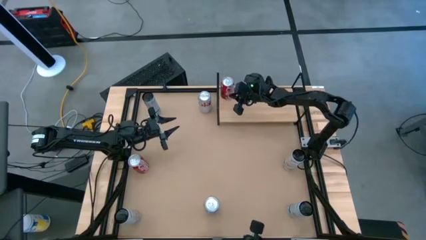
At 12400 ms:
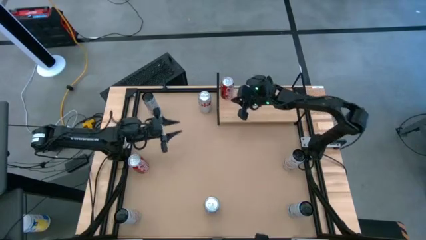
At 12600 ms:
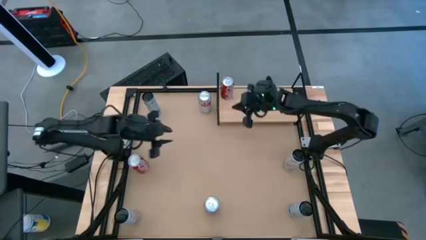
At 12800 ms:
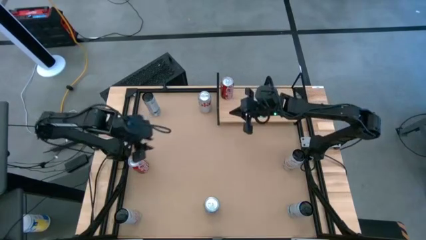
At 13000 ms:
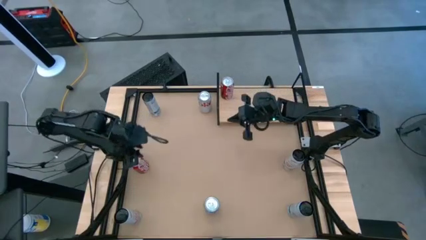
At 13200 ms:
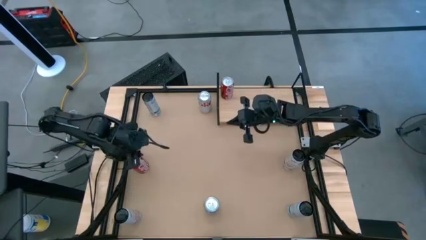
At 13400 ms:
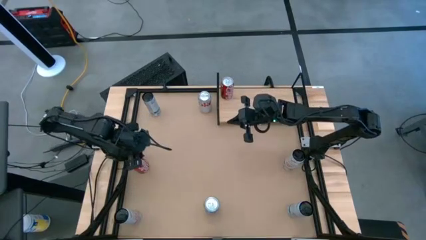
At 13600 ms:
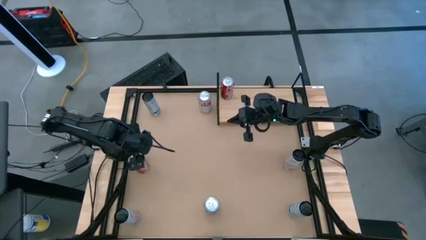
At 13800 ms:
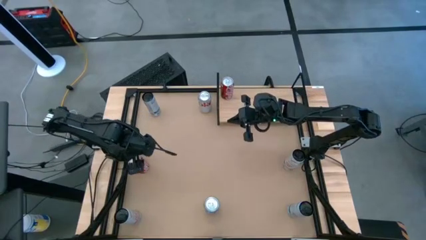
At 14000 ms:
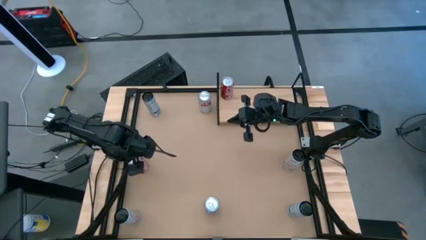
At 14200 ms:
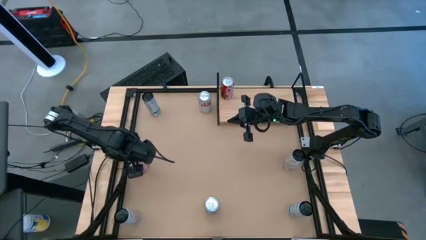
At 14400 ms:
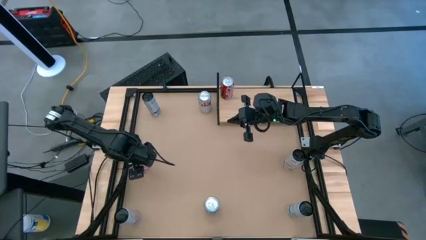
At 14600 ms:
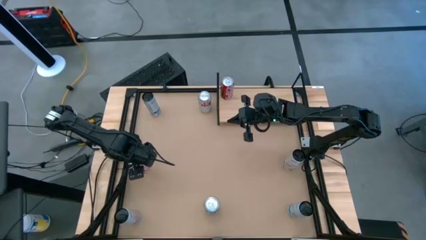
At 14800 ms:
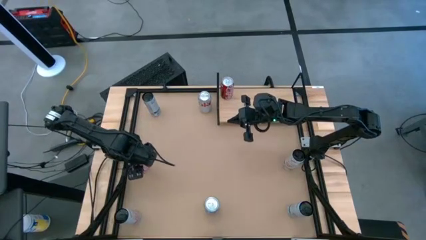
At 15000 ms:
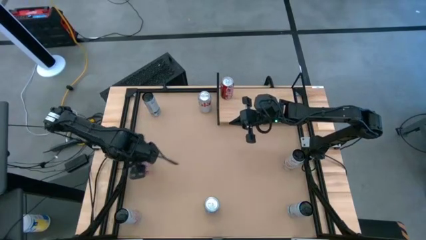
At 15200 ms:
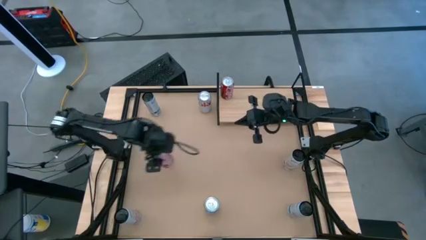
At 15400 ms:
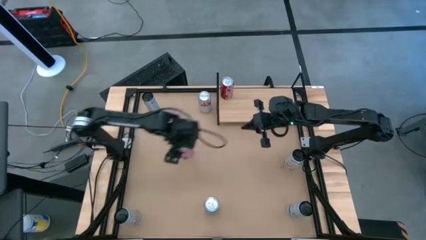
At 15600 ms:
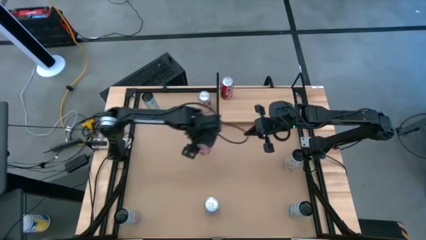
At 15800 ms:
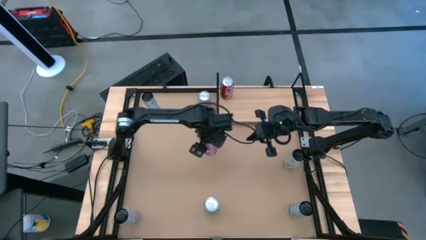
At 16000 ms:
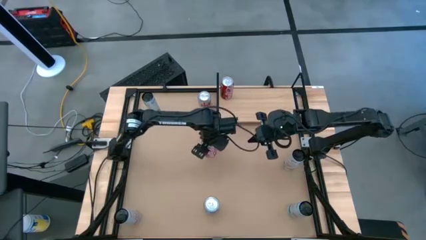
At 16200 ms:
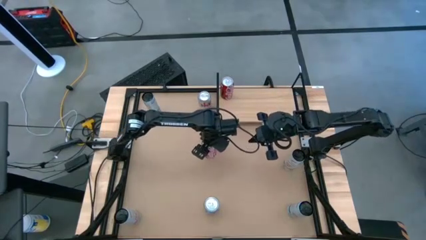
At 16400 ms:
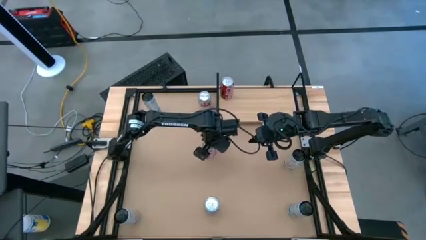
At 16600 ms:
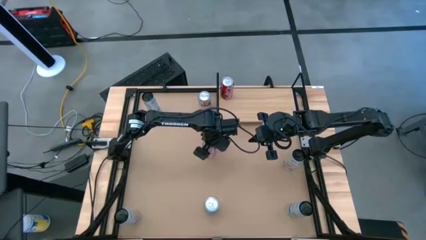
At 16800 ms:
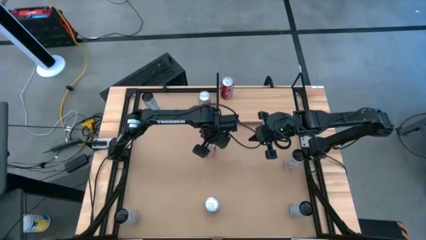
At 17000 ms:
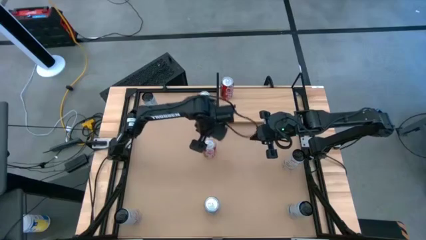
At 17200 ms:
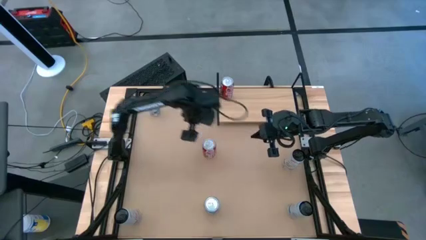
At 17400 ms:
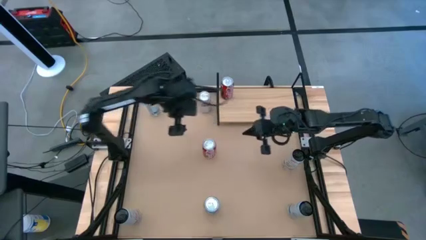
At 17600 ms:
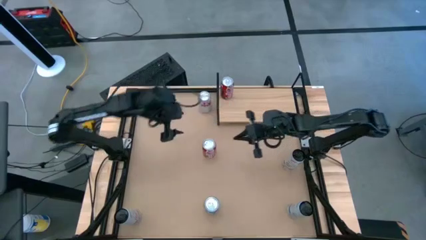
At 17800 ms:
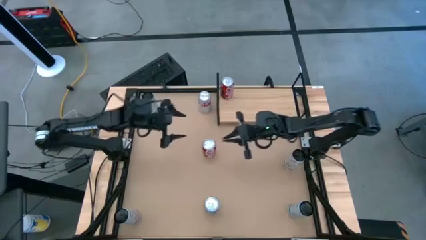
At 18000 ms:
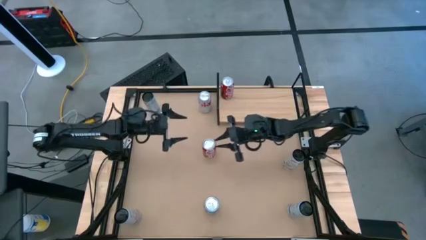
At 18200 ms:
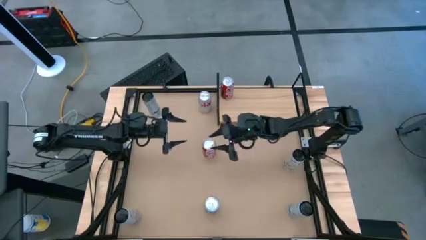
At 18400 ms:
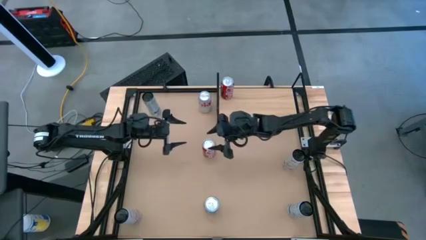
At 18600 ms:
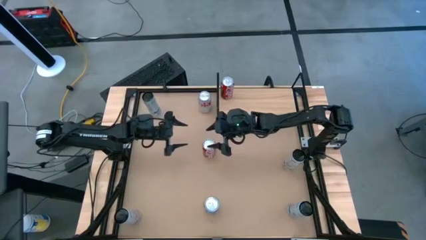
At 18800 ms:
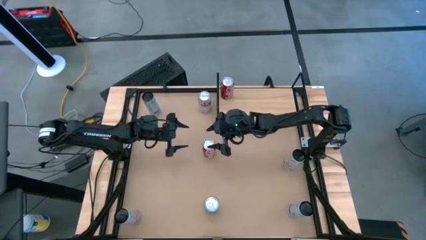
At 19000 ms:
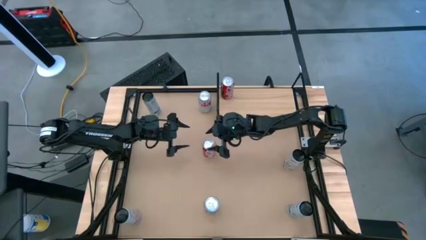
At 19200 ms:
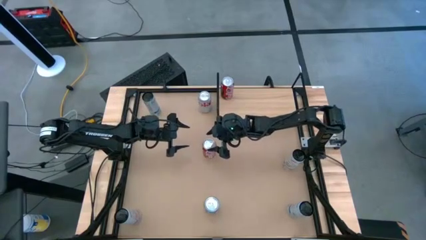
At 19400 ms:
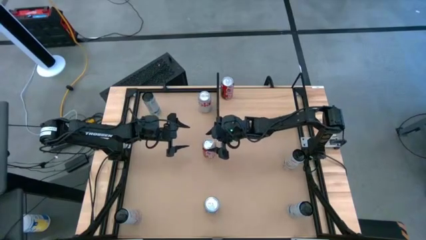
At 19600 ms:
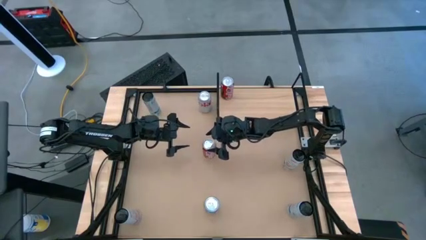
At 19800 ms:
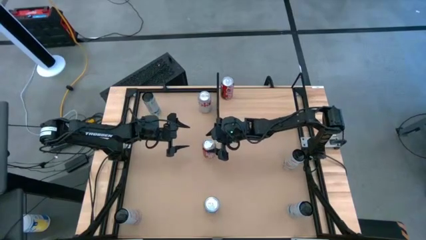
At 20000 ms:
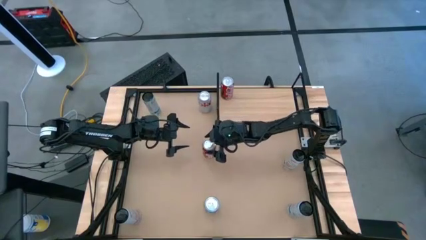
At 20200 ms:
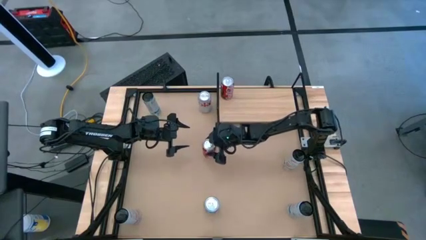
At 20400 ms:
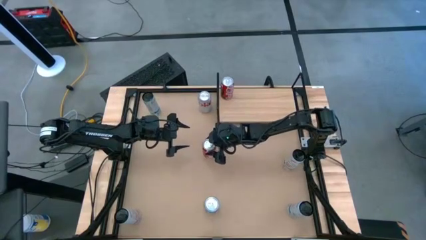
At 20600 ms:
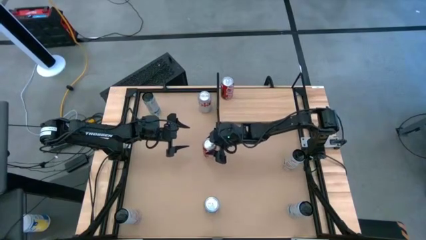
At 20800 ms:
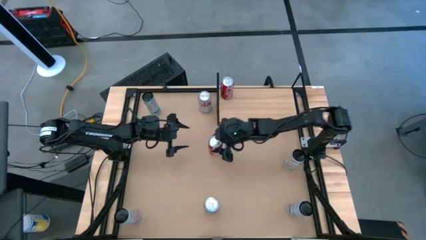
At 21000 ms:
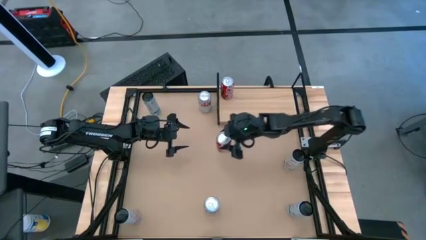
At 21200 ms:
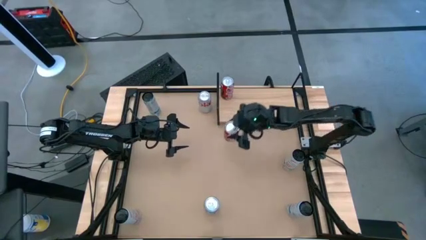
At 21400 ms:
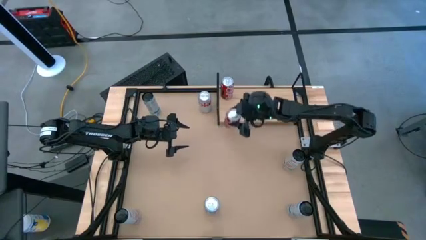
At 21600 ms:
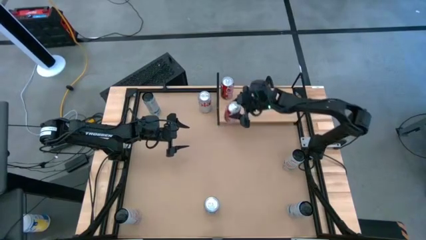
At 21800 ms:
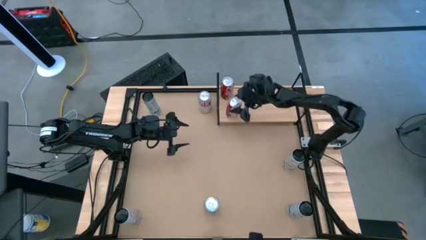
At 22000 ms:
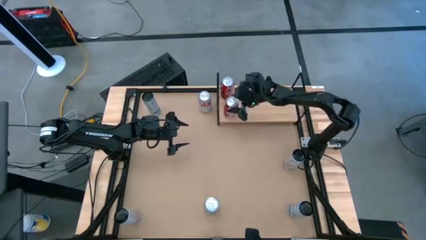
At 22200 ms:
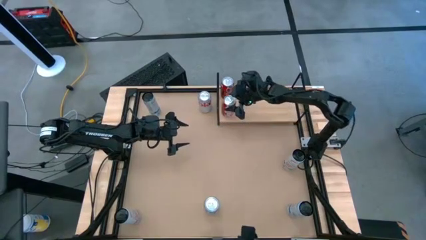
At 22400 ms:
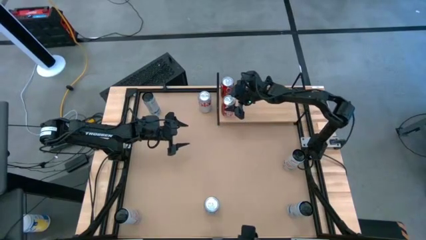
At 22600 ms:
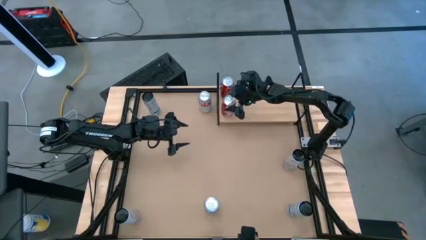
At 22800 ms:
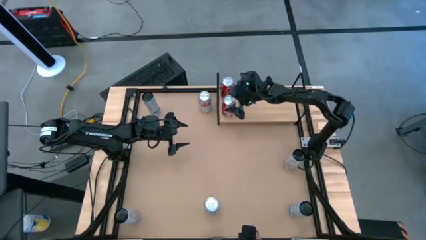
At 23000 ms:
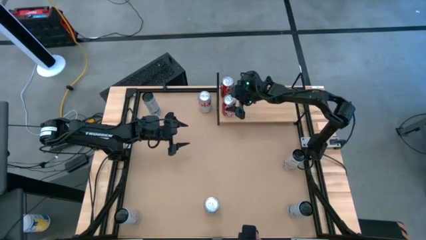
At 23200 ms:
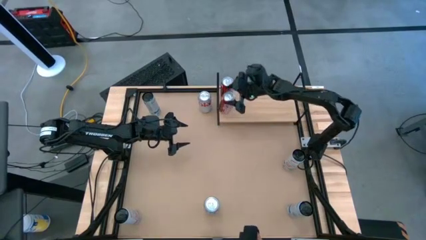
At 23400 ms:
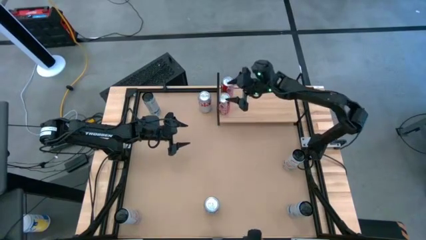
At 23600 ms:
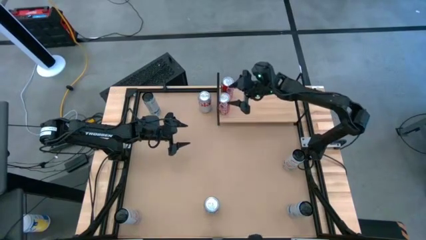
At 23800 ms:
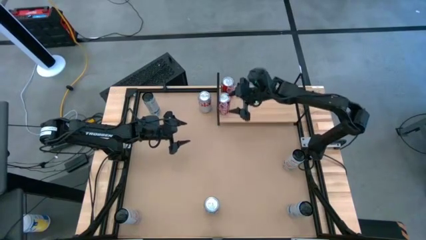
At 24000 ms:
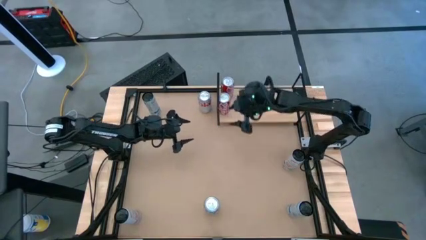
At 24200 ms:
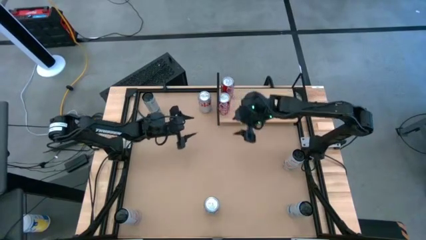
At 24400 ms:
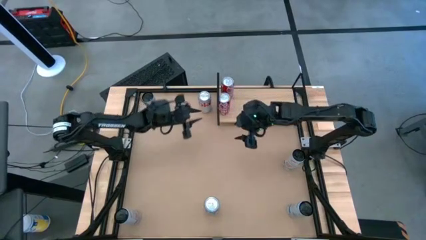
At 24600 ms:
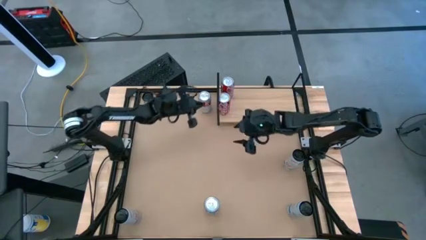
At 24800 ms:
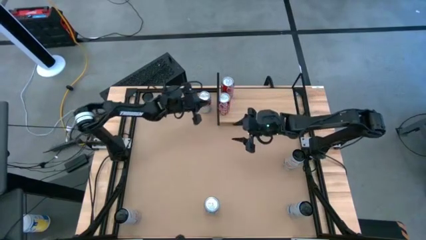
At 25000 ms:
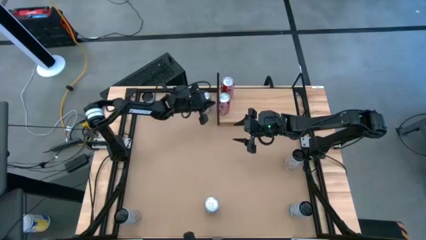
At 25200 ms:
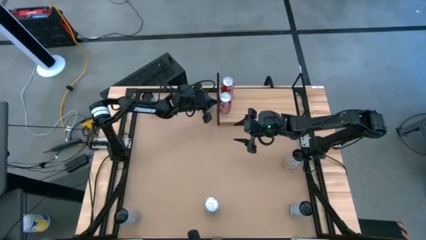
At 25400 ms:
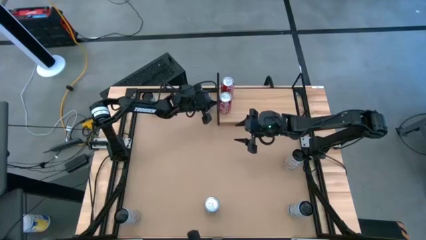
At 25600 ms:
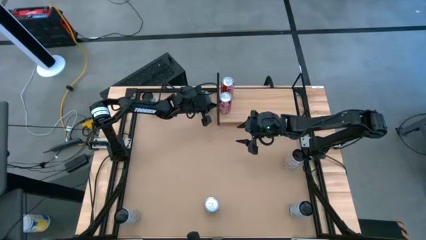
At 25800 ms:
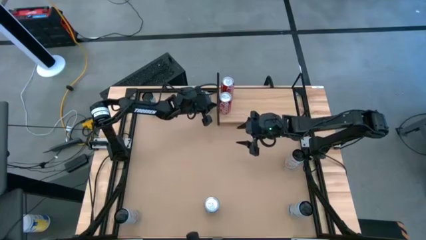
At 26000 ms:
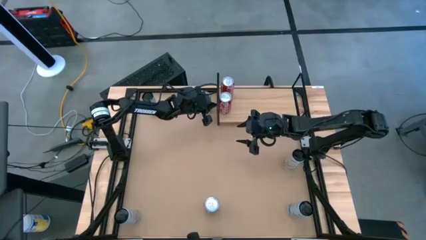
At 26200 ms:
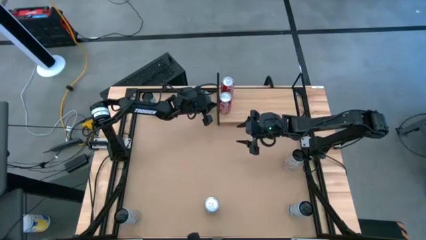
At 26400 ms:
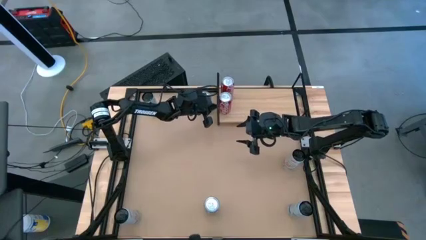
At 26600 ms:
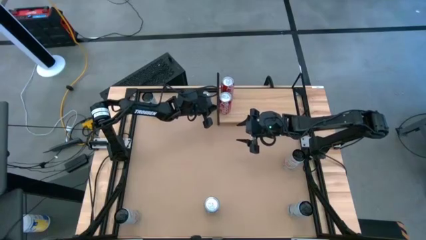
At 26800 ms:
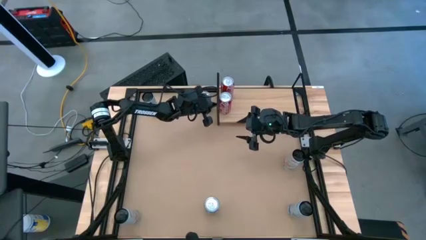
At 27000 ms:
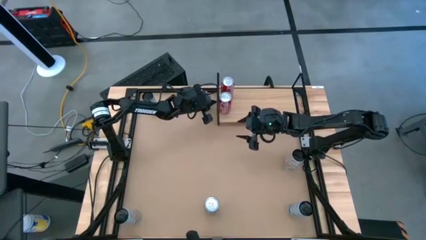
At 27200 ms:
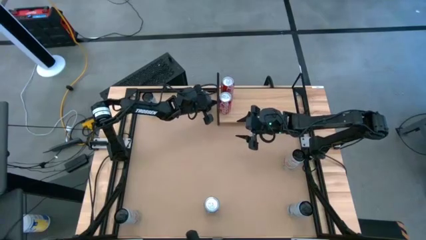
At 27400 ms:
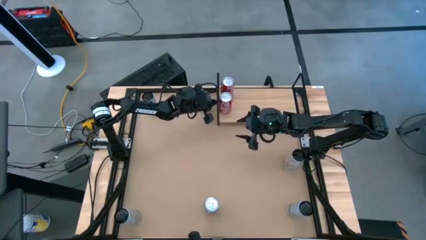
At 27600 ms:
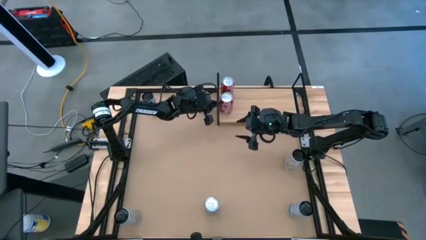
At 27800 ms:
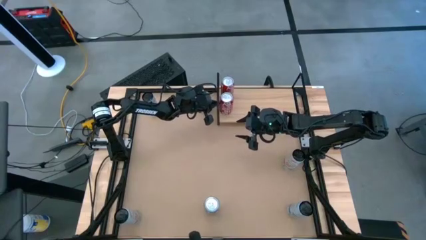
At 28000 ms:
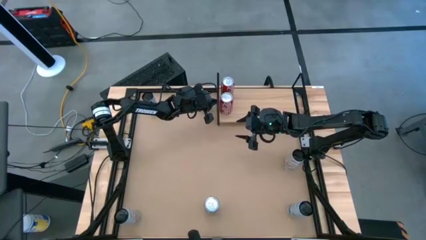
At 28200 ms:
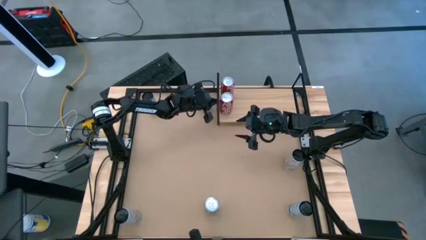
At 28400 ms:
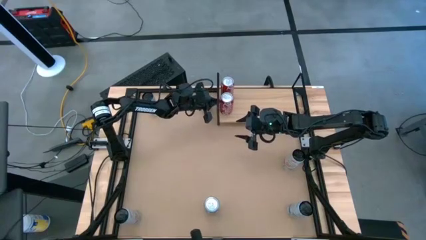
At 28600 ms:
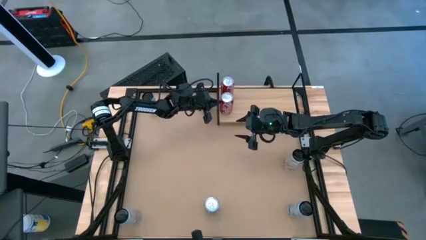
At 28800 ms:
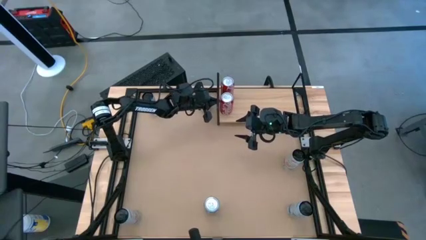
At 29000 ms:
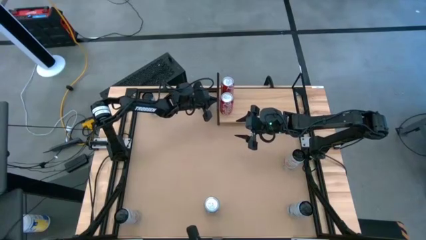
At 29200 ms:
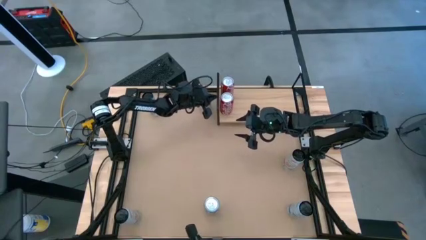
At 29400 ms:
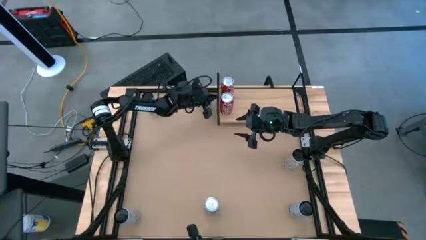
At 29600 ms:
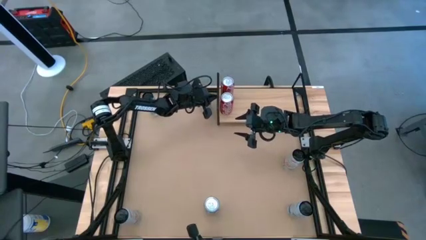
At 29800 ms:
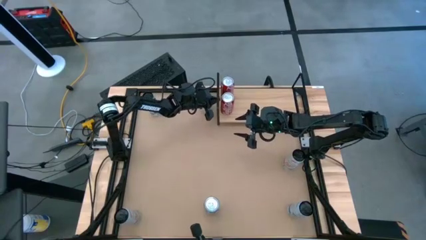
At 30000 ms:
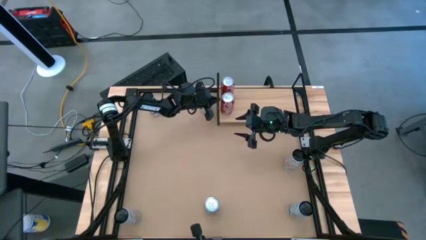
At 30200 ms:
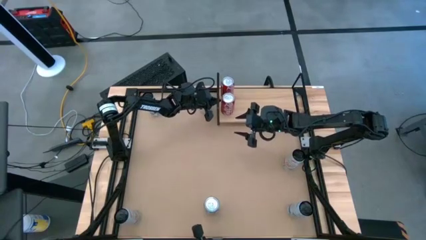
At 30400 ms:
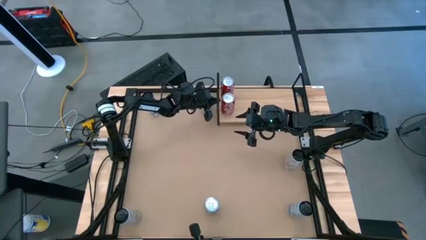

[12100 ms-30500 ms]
Task: Place canned beverage on shelf
Put the red soda can on the shelf aligned with the other red soda can
